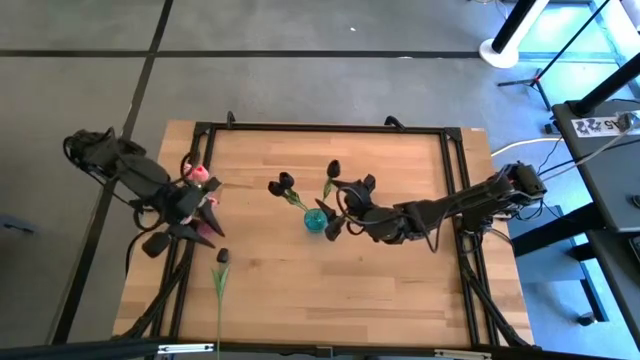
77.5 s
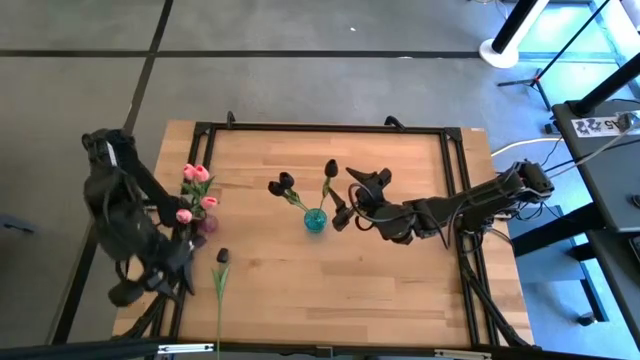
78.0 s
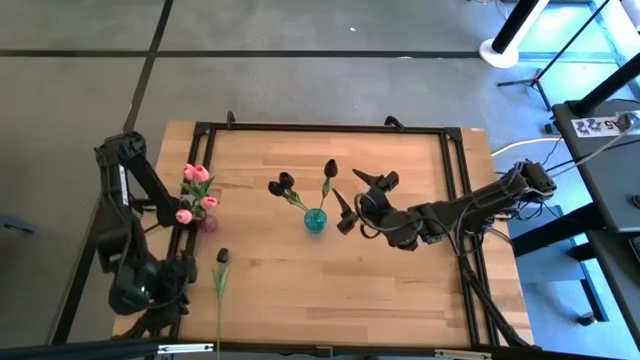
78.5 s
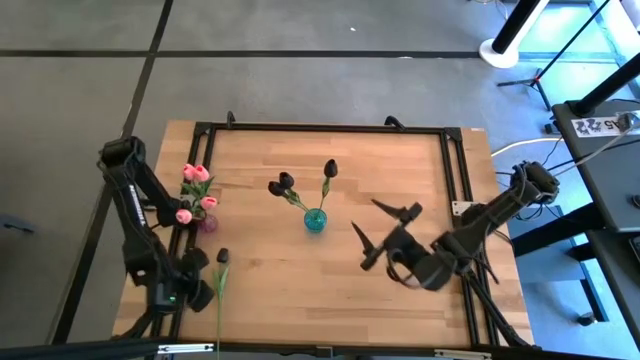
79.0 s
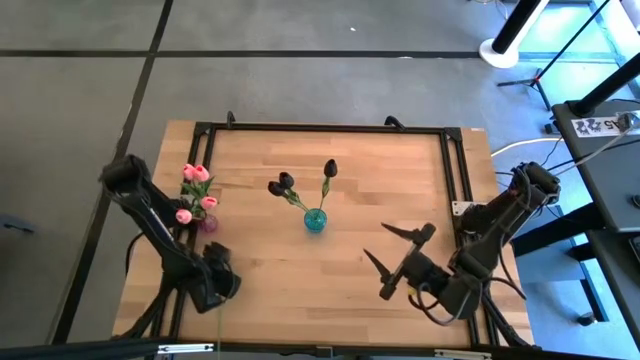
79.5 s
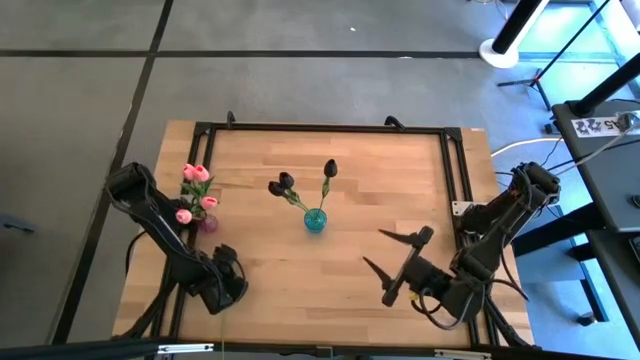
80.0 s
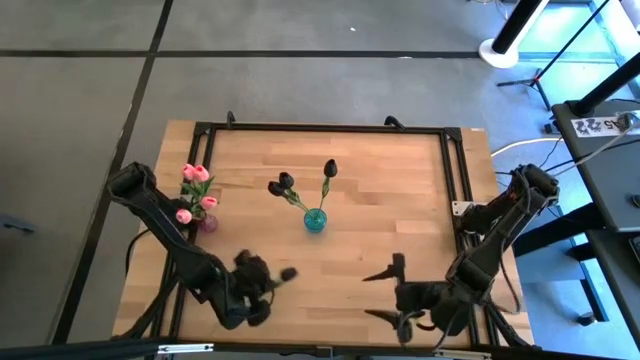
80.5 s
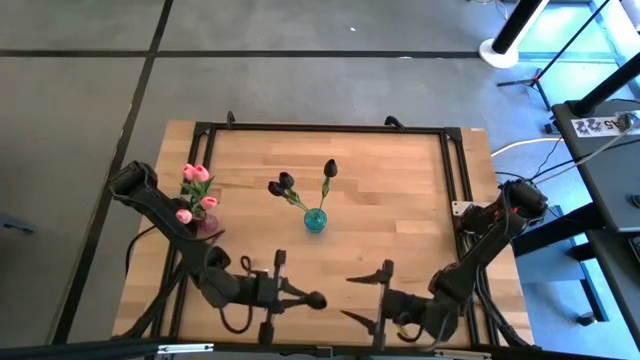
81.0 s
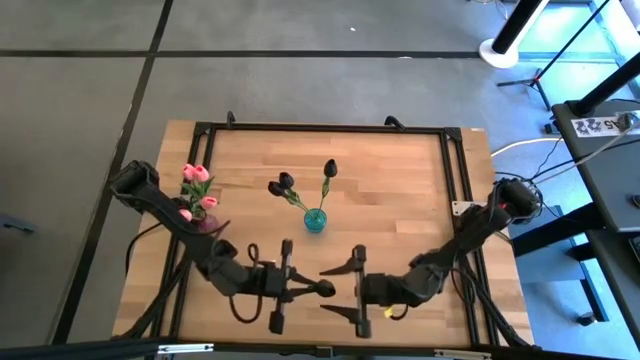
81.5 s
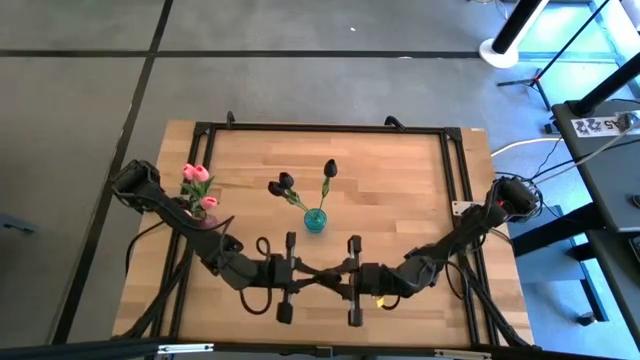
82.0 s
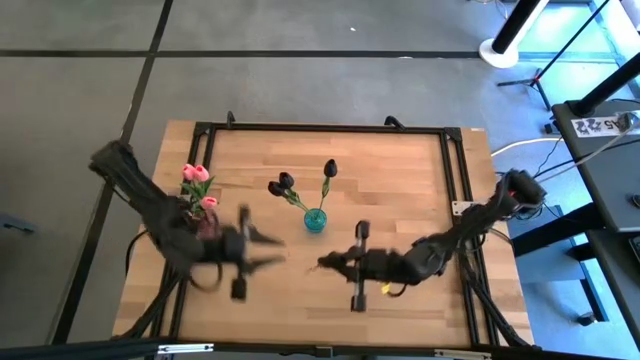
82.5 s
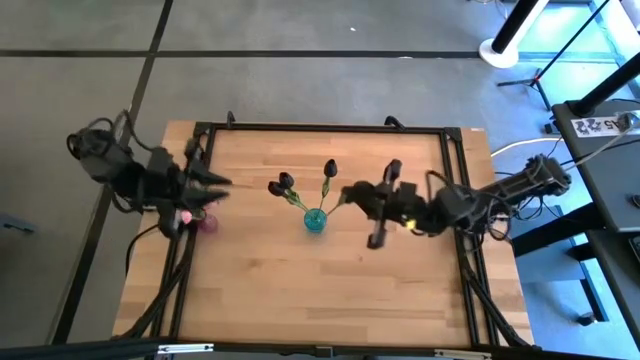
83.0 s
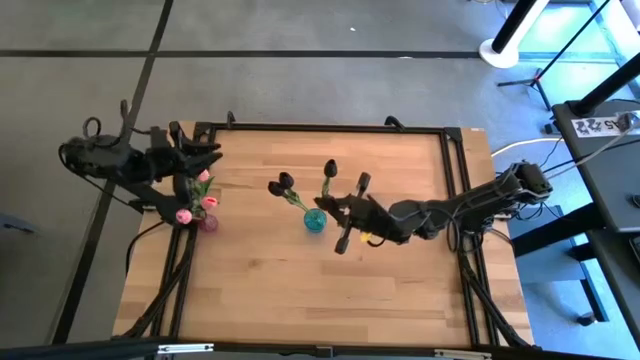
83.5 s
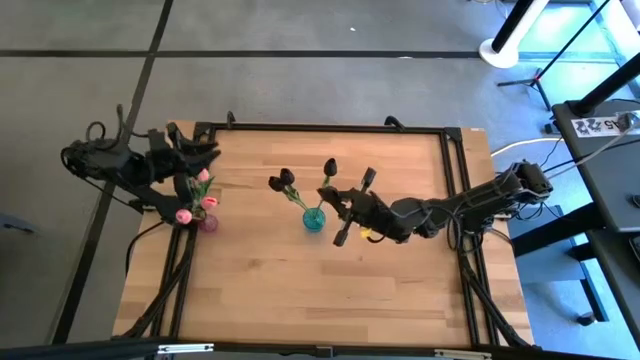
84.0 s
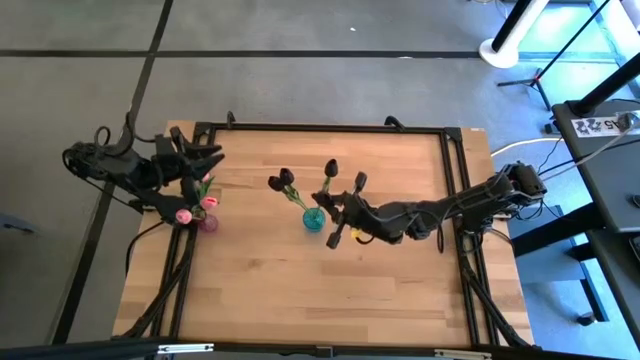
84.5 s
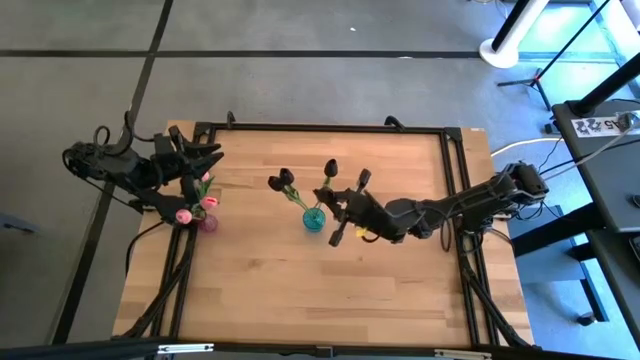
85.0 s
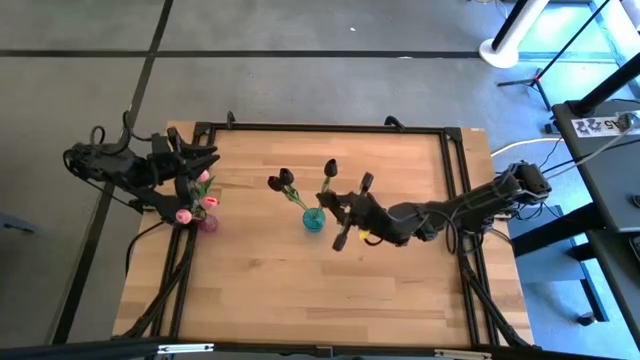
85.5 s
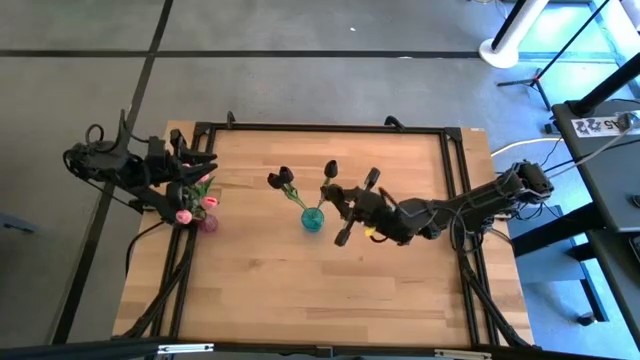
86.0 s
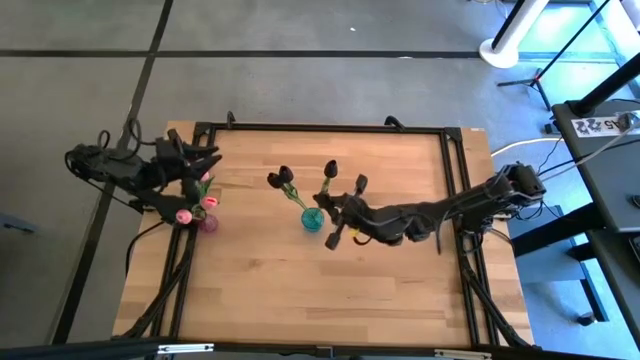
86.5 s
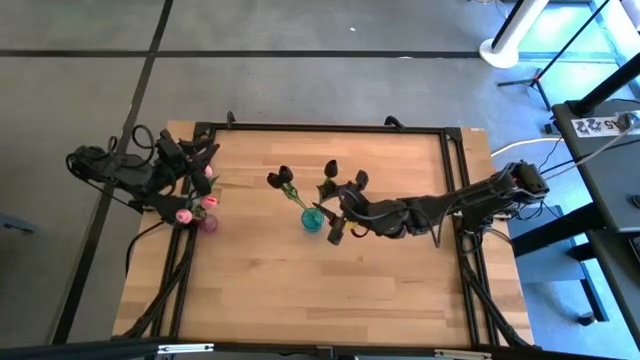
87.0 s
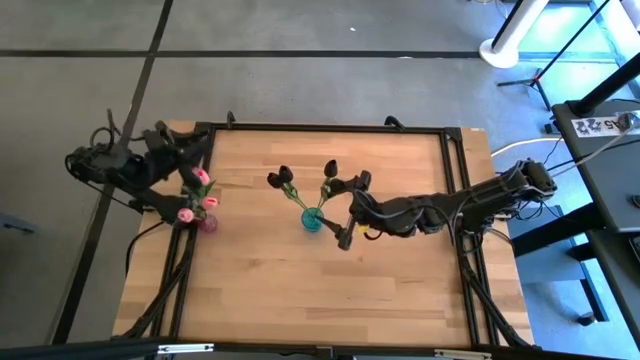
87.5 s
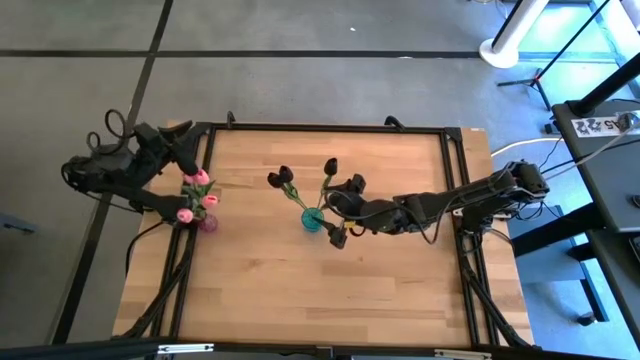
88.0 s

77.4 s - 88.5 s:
Task: Sort flowers into vase by color
Put the black tulip into the blue vase

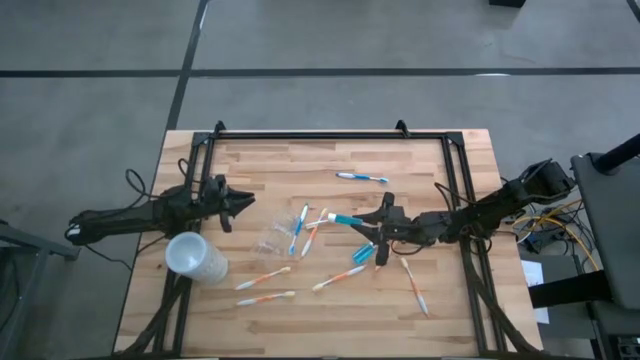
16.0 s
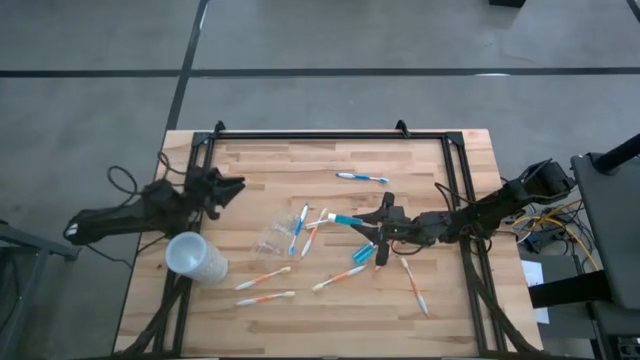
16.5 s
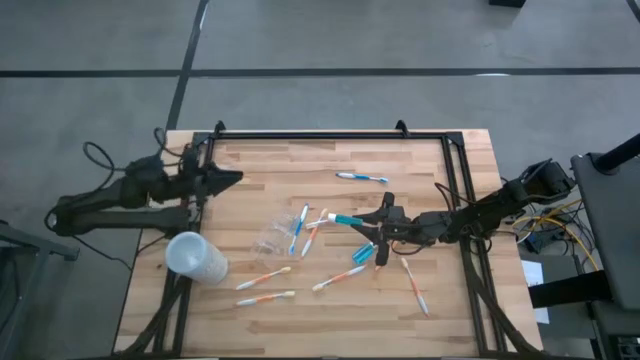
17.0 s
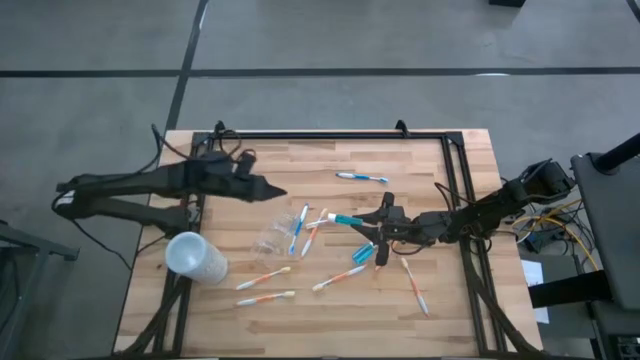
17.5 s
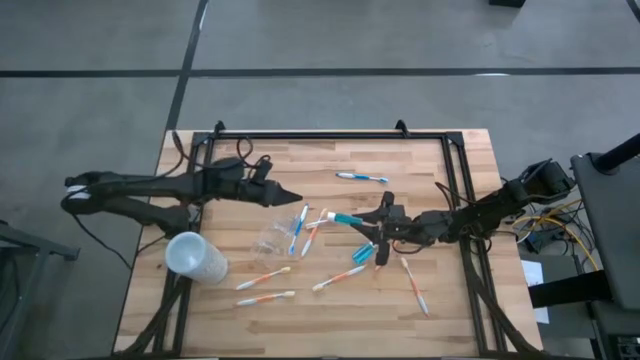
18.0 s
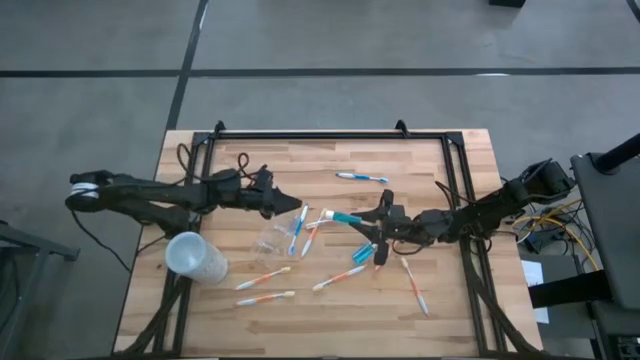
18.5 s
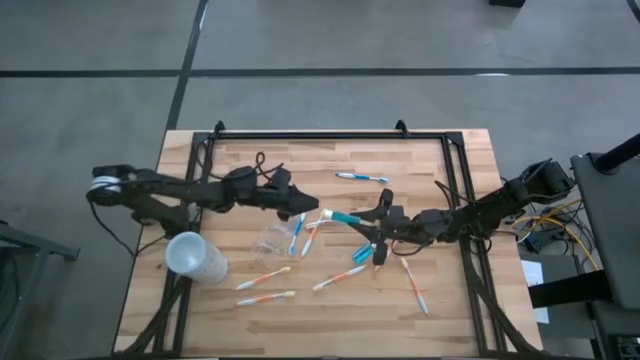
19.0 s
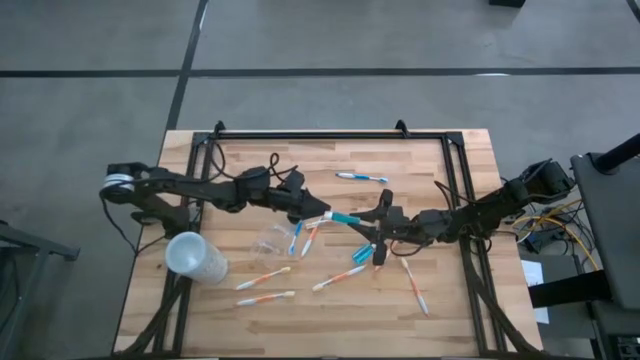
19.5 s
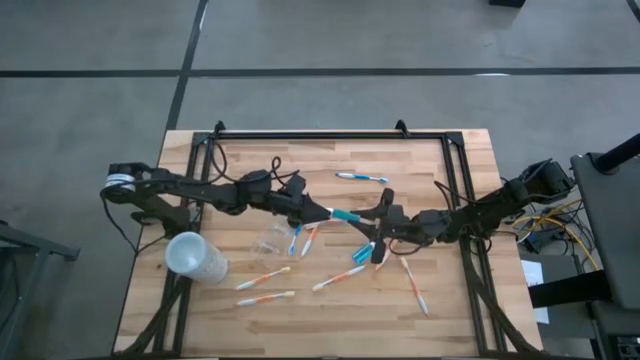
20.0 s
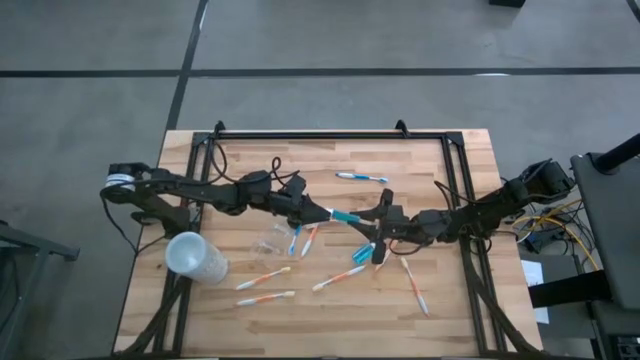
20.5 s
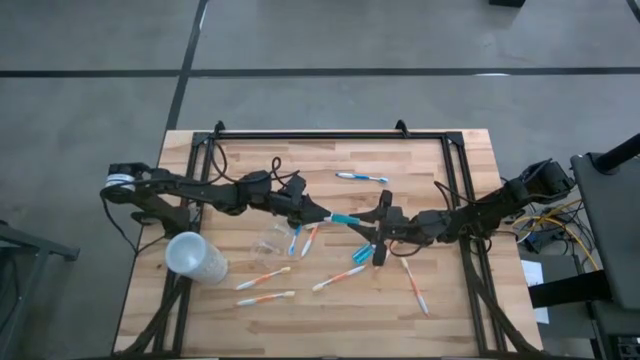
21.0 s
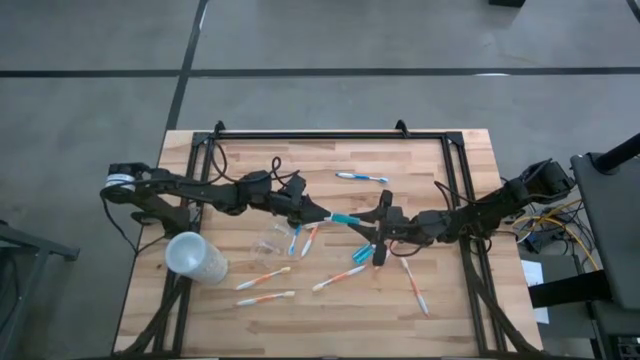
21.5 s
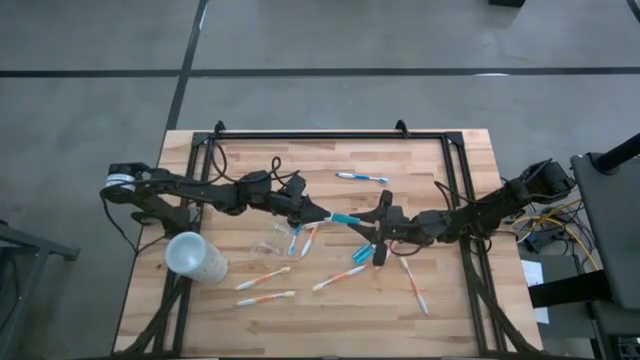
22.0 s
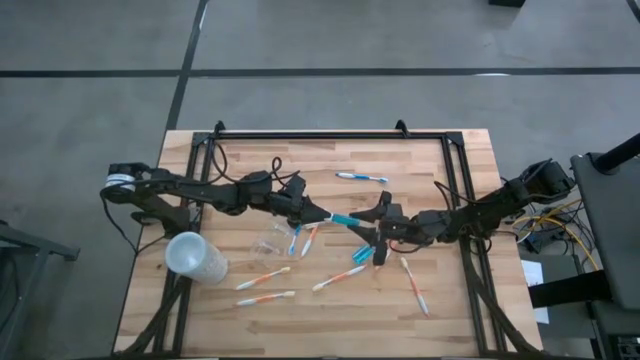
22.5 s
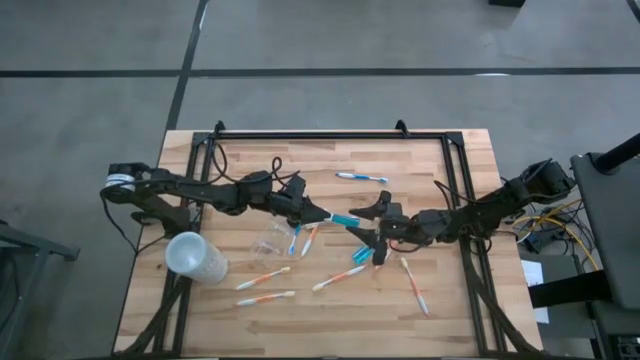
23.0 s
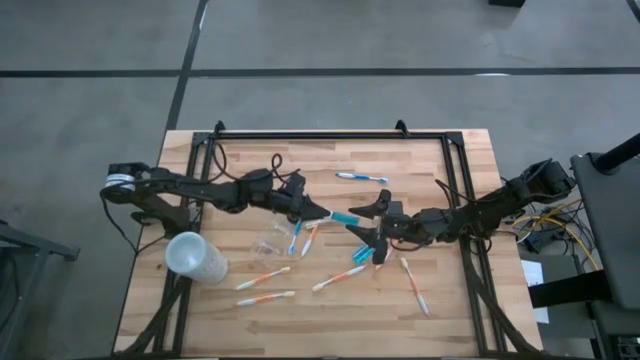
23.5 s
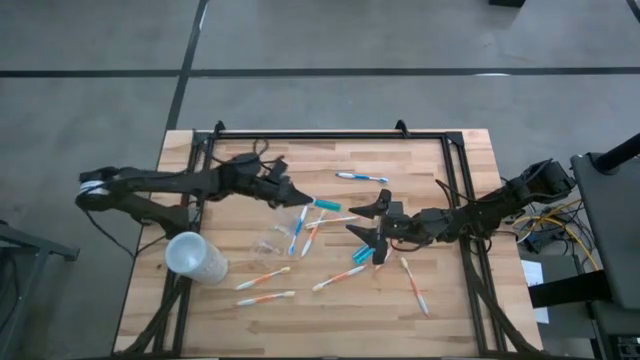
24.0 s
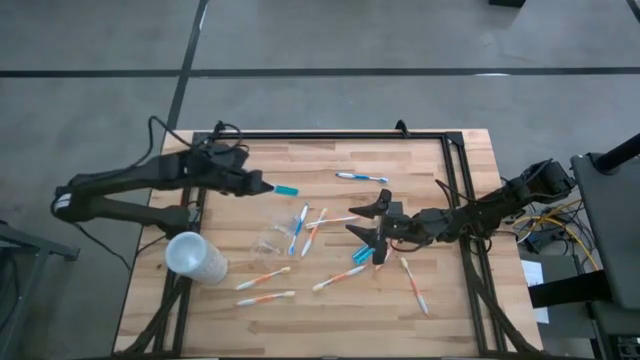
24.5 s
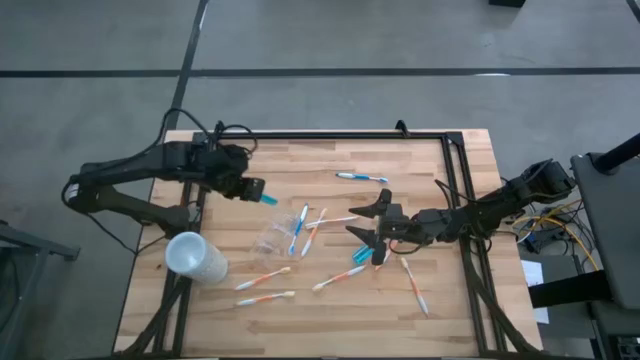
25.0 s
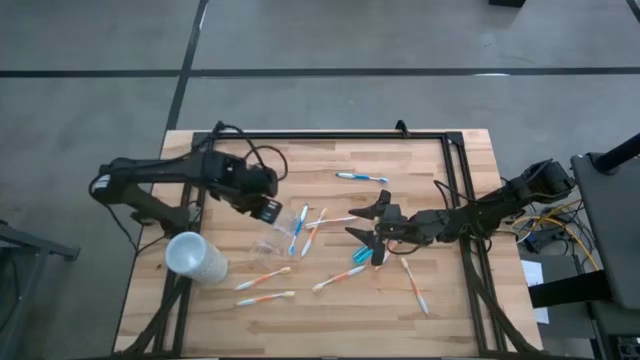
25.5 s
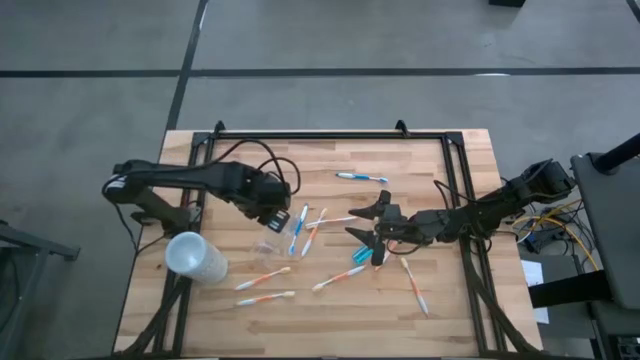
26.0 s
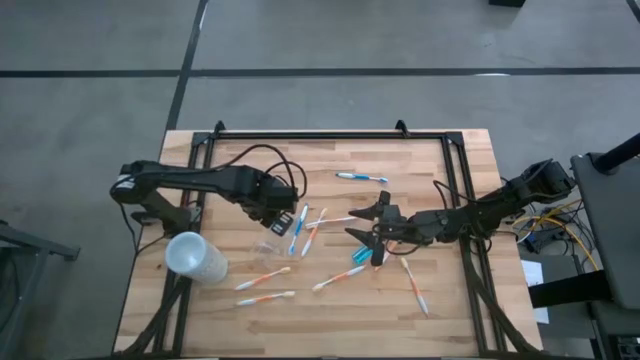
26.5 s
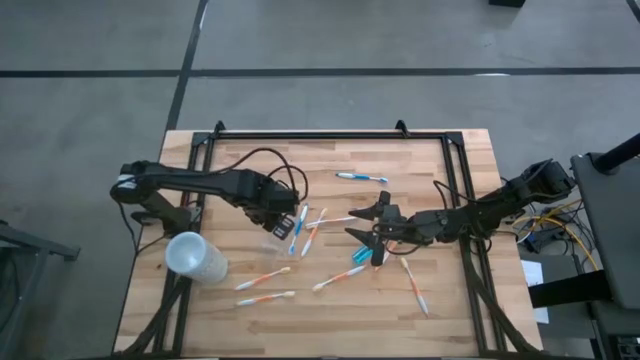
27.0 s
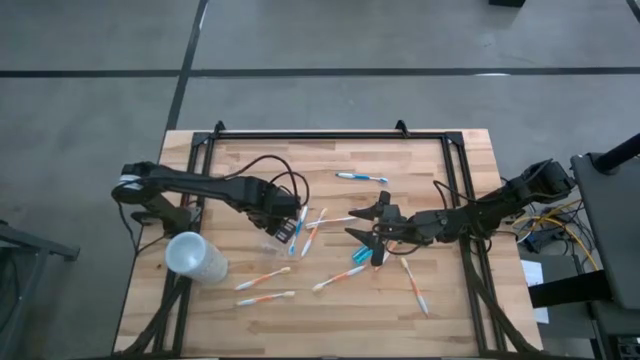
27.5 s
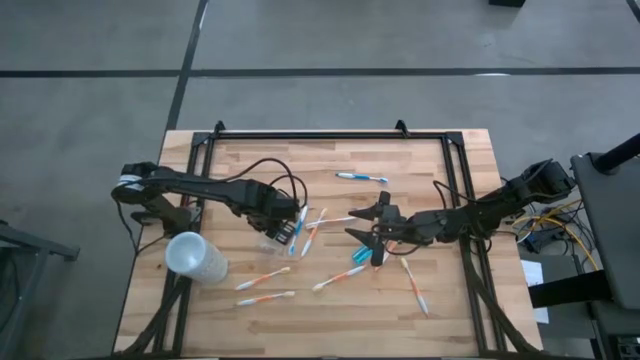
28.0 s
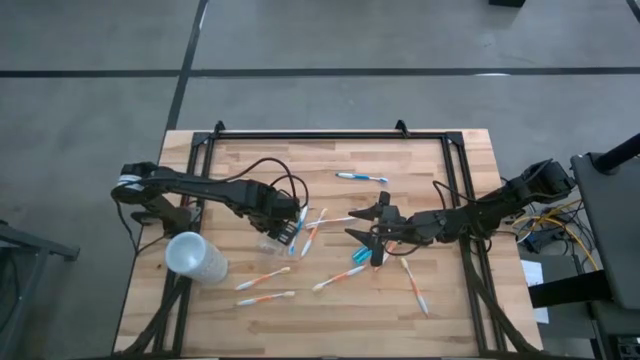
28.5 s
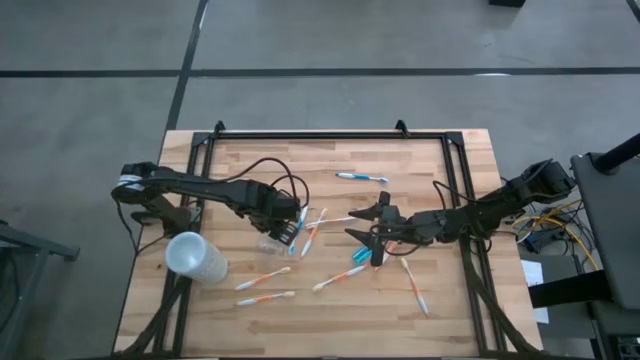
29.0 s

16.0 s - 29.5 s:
Task: Pick & Place toothbrushing station
Put the left mouthwash bottle into the transparent organizer
